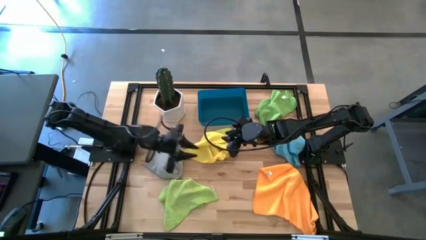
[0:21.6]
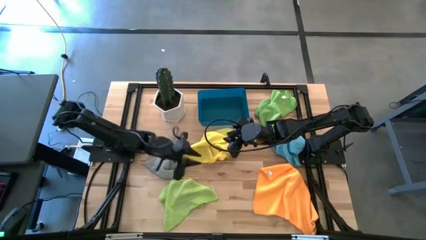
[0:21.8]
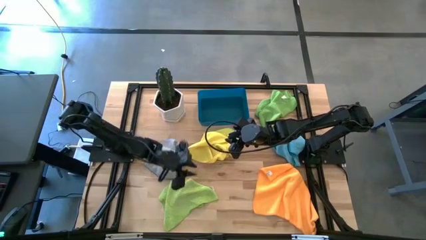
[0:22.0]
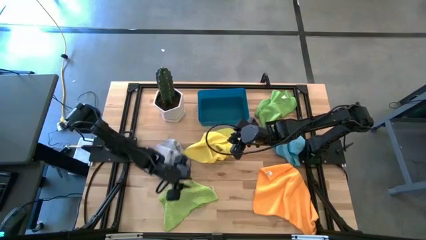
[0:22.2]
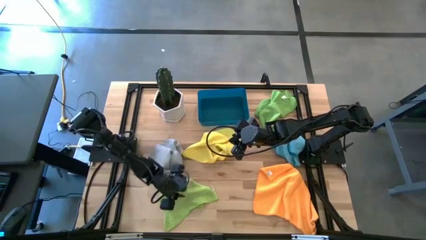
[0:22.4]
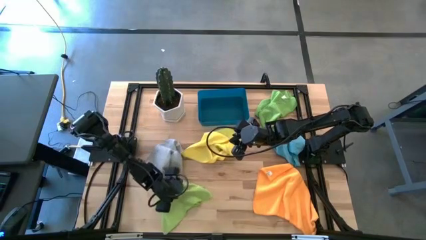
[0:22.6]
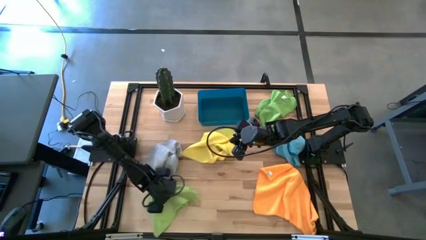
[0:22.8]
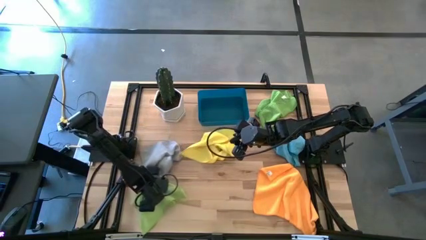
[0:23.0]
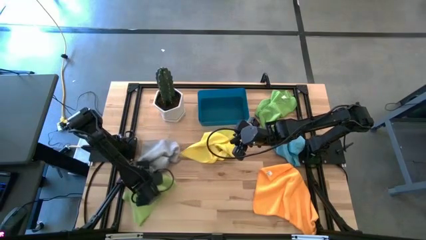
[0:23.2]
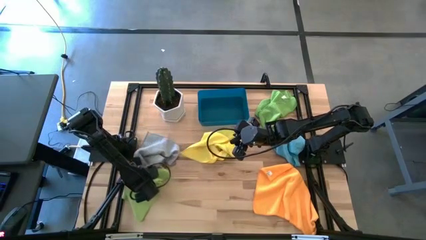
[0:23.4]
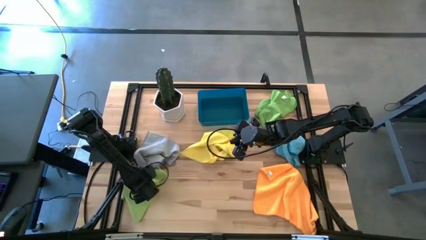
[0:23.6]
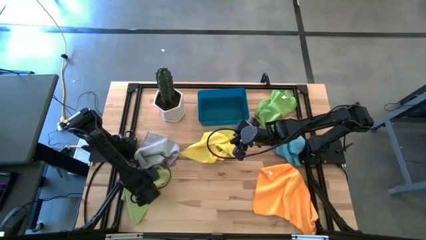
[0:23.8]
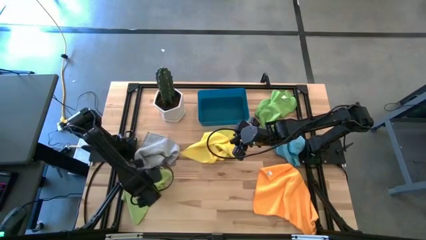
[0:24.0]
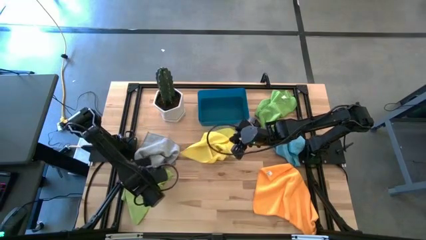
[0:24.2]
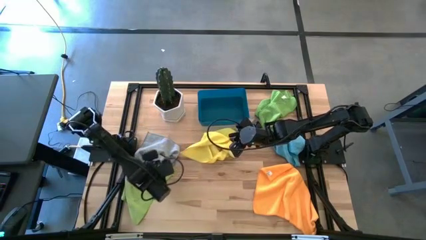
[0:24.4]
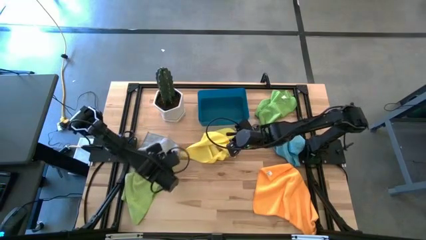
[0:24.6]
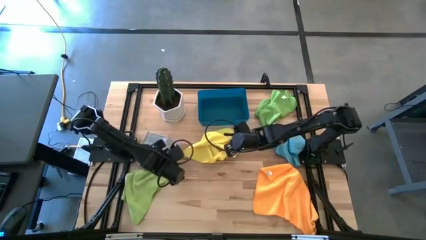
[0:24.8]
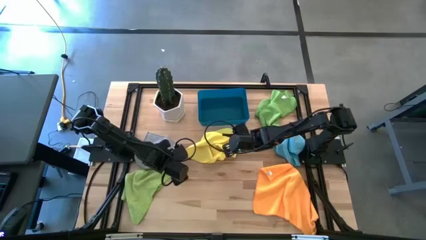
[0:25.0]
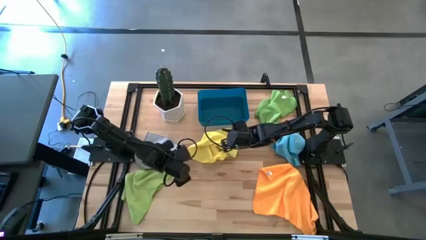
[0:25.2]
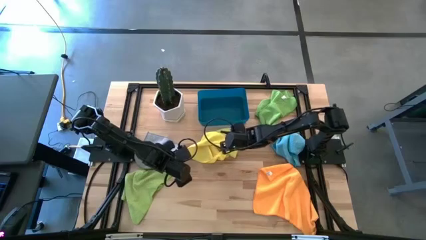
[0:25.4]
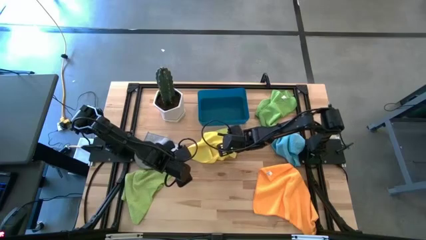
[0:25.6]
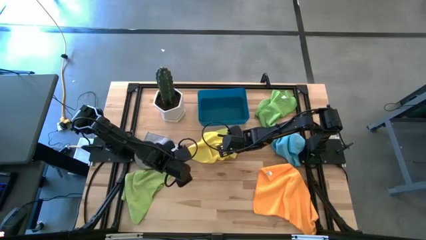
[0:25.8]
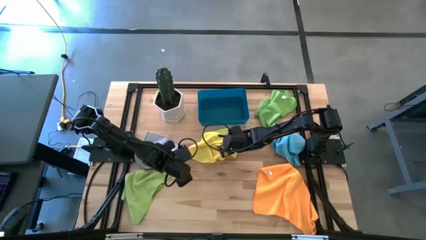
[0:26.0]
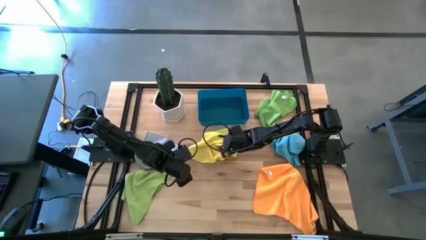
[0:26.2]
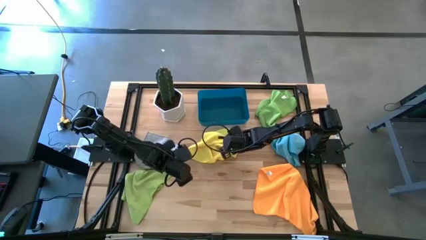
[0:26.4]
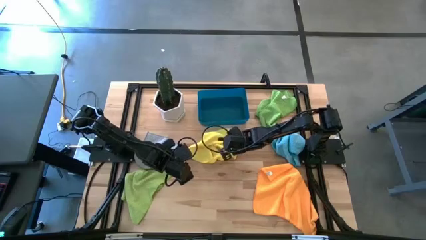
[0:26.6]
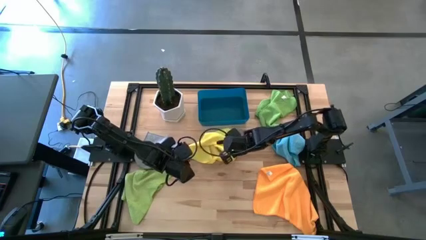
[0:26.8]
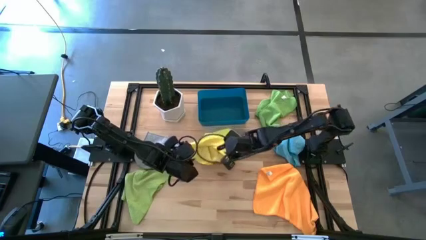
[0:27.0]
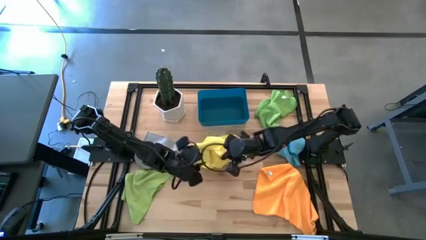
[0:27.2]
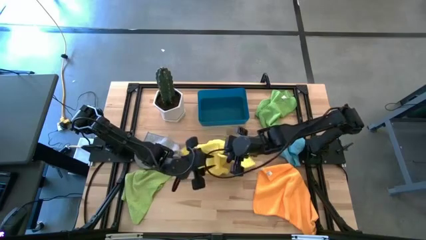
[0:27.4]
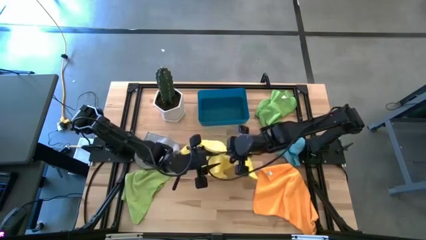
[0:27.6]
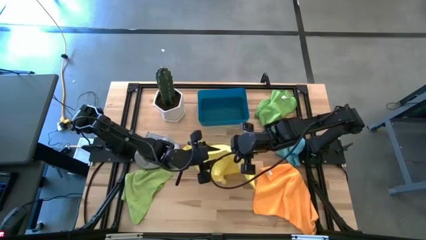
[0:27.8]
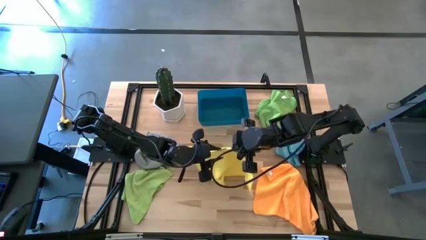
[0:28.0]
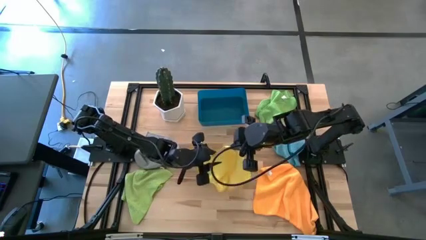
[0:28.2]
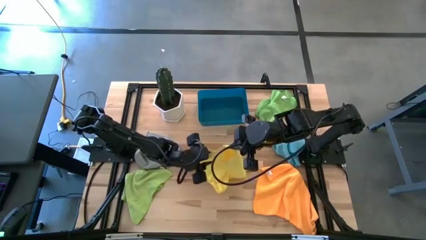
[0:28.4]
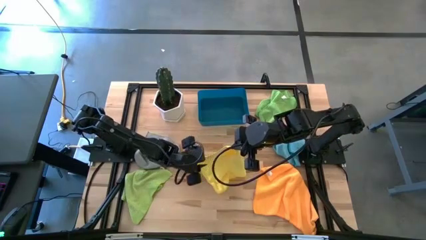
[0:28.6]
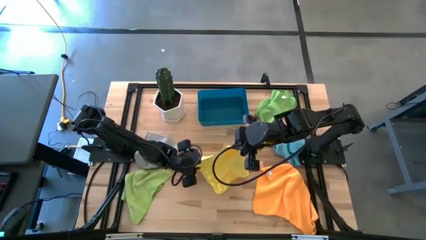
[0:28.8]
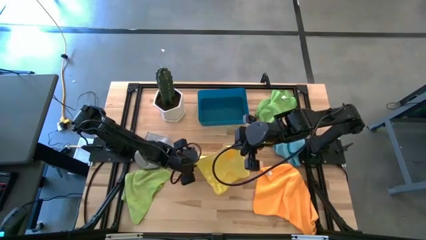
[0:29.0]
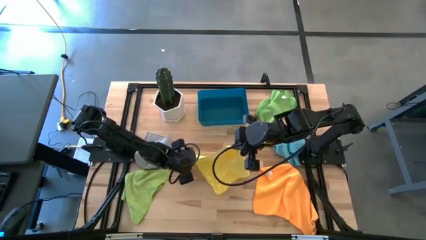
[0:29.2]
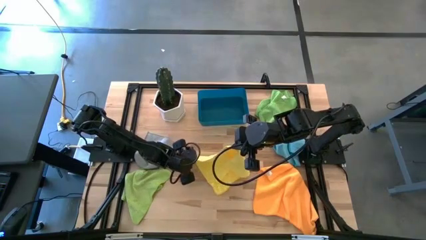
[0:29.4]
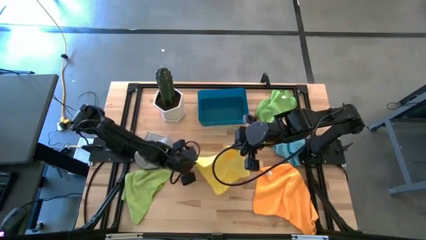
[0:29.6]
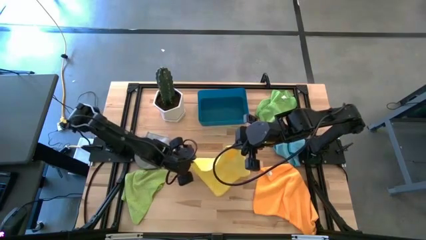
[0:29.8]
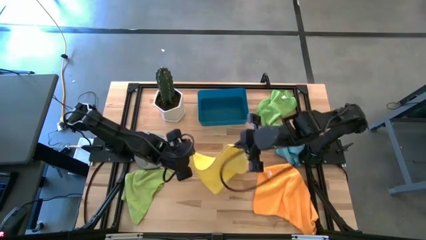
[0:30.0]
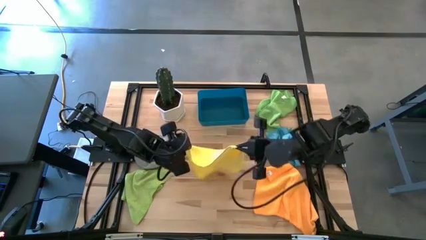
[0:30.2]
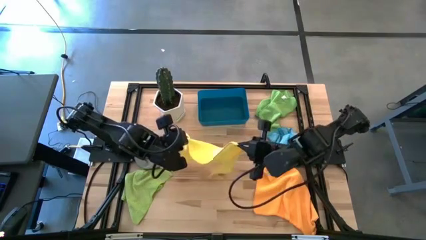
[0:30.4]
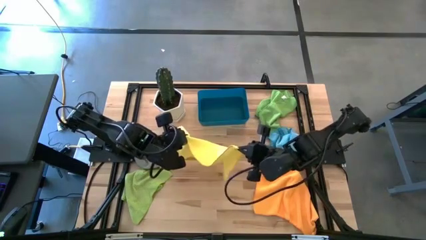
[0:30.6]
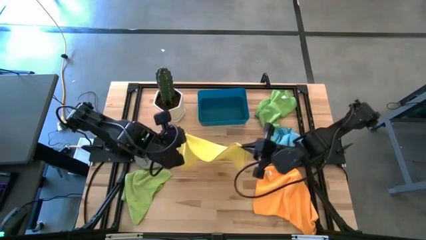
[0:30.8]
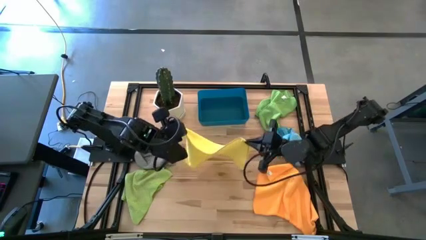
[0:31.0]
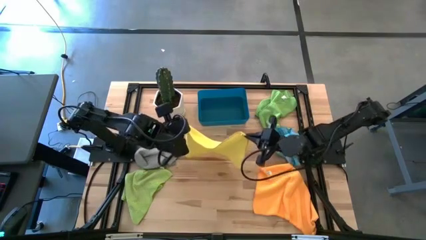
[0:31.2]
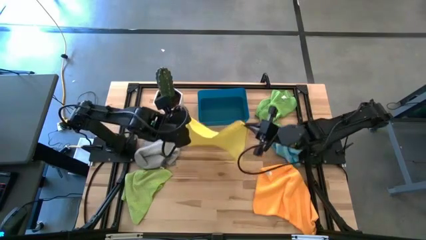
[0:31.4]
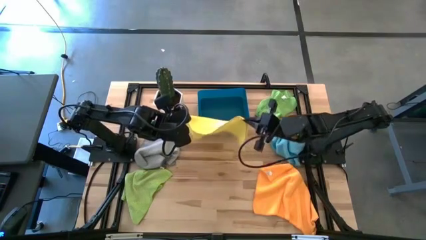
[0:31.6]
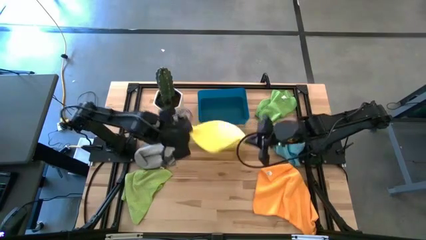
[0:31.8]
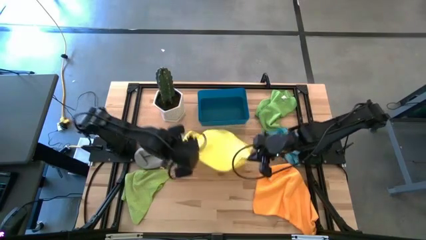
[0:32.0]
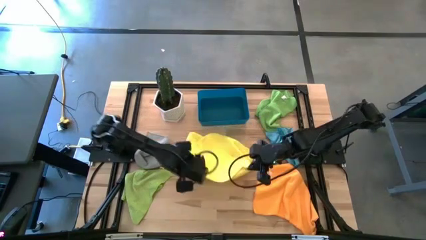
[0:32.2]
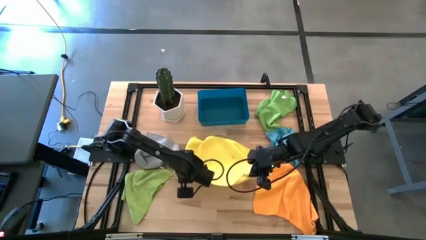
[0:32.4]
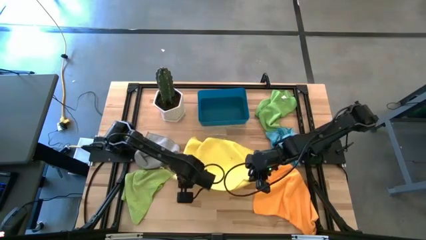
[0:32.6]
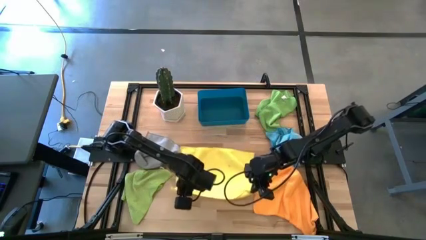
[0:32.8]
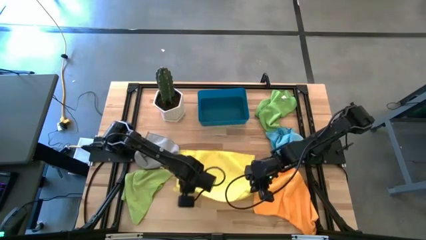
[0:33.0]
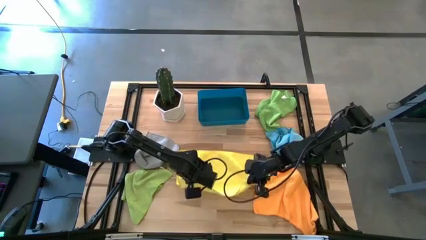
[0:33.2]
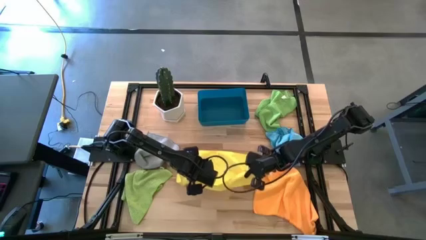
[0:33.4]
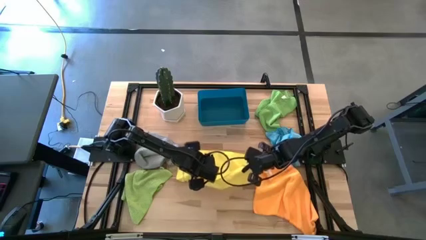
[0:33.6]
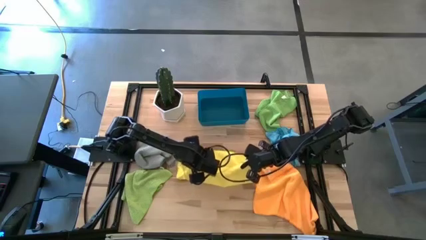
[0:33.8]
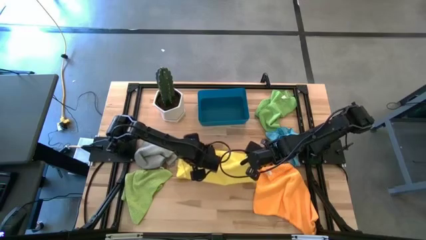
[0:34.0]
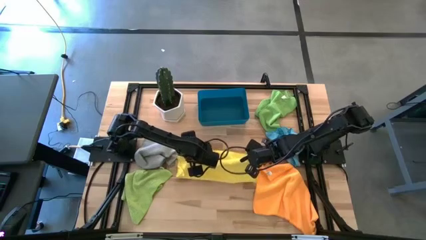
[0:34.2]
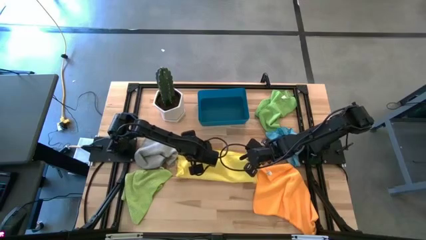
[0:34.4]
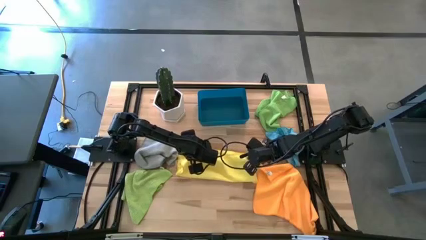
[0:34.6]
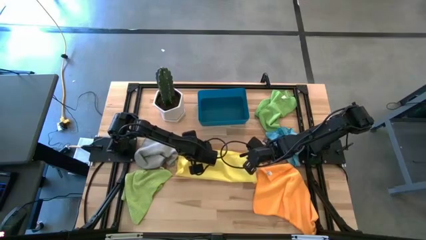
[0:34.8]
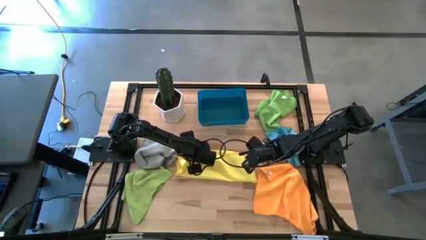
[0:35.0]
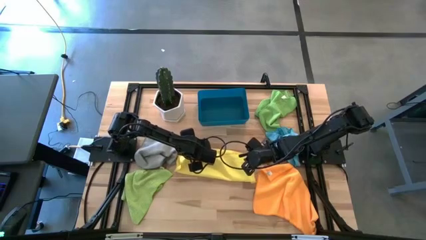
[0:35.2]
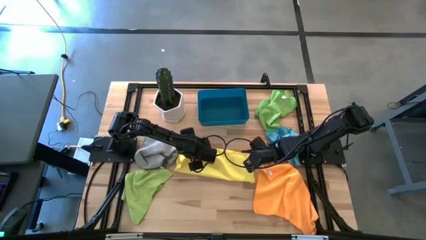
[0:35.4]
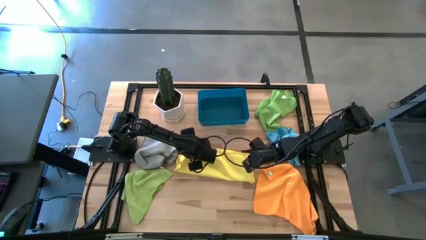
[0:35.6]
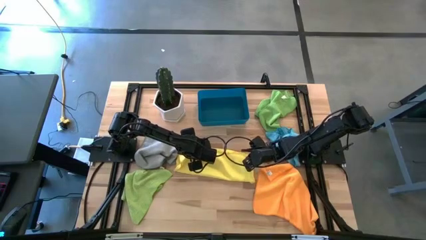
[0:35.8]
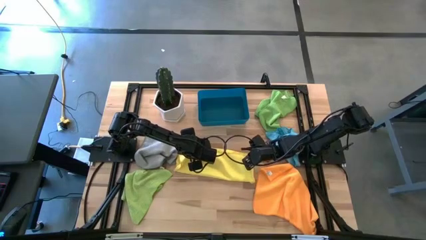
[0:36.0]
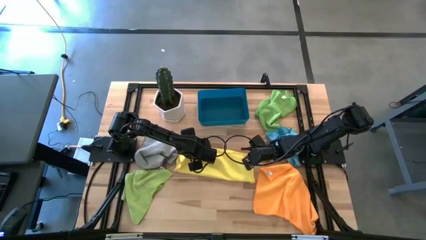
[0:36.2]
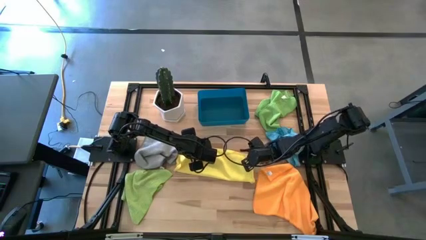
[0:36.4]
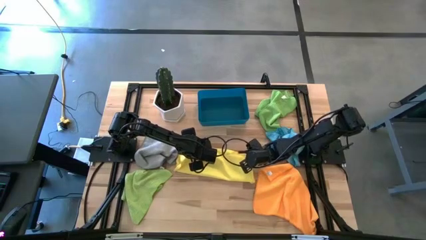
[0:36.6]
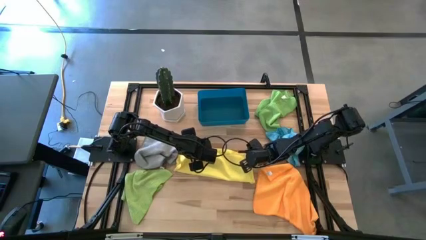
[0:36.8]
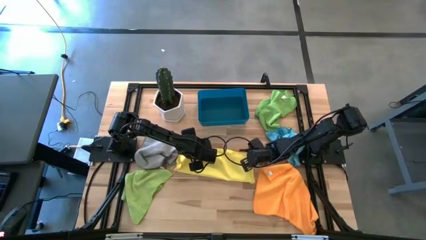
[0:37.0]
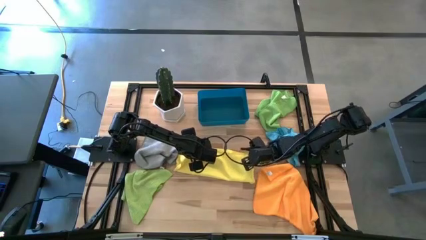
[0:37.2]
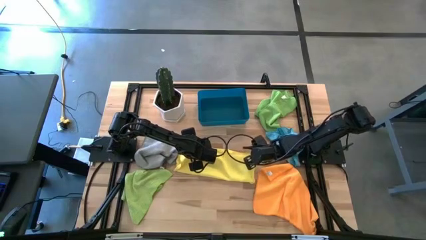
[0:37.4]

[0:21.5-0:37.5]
Task: Fold microfiber towels
Fold the yellow microfiber towel
